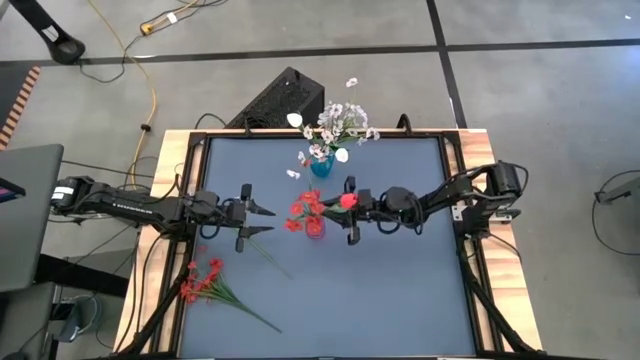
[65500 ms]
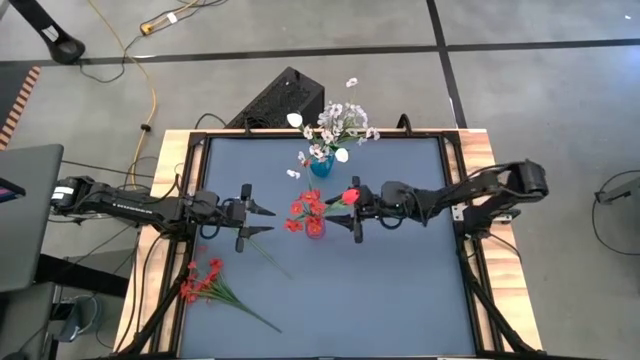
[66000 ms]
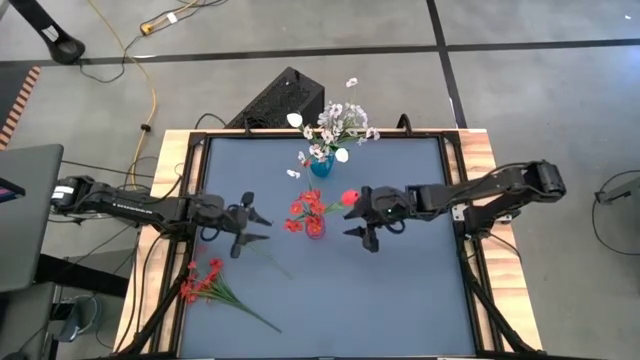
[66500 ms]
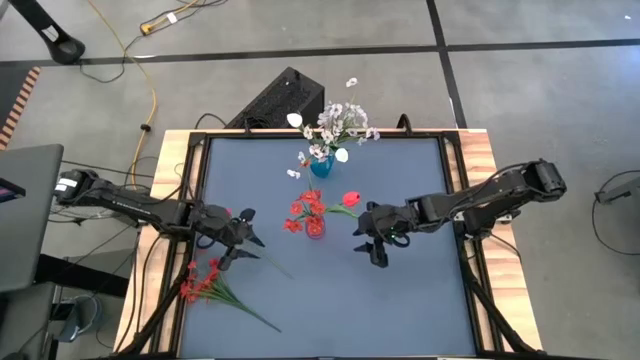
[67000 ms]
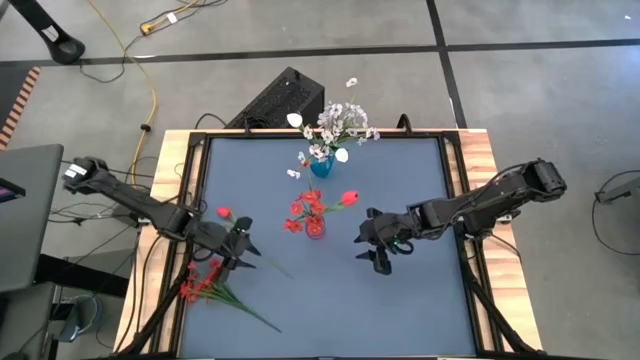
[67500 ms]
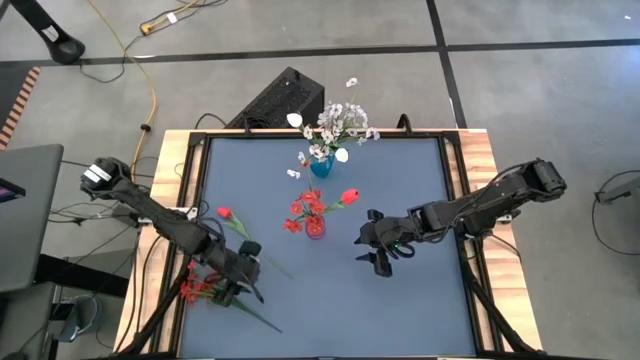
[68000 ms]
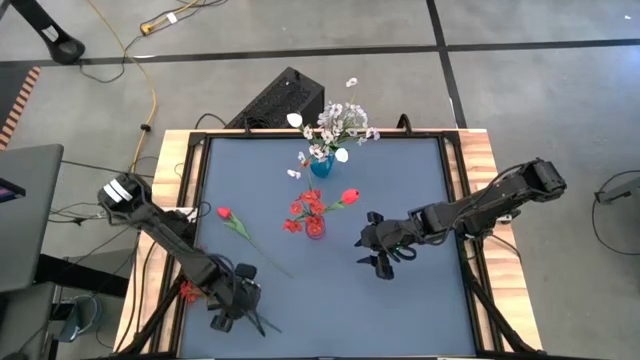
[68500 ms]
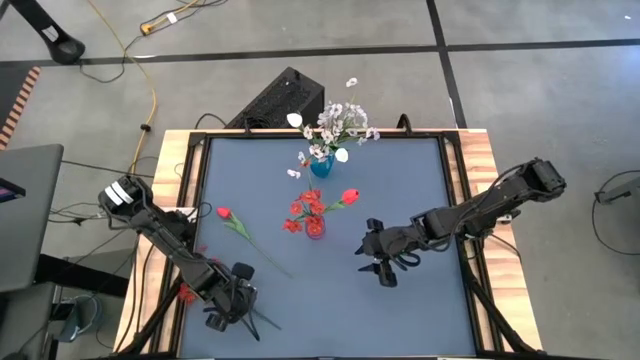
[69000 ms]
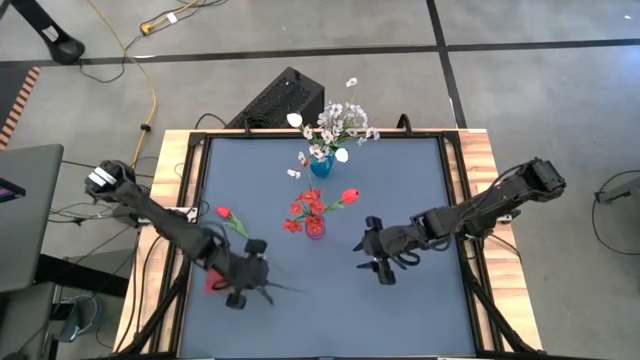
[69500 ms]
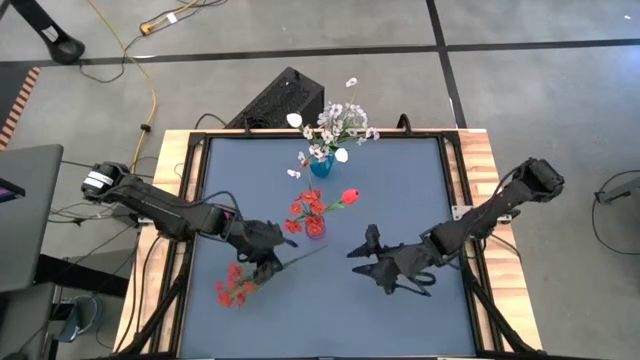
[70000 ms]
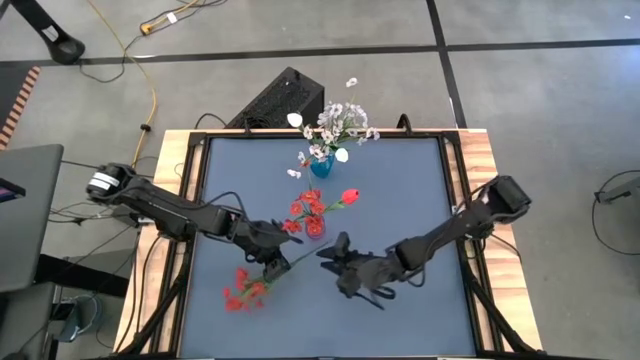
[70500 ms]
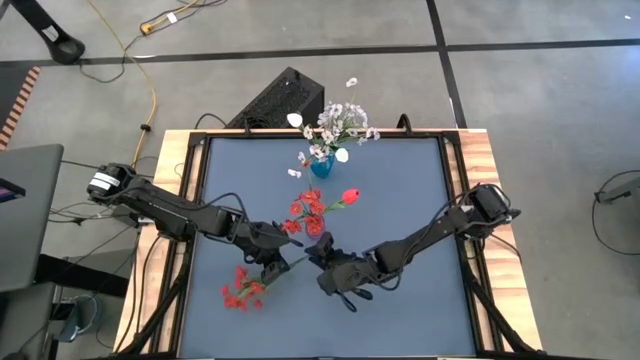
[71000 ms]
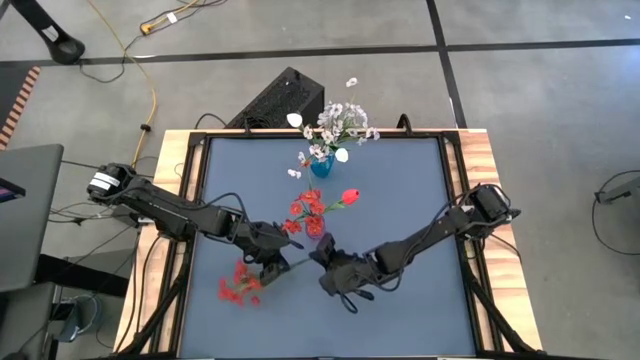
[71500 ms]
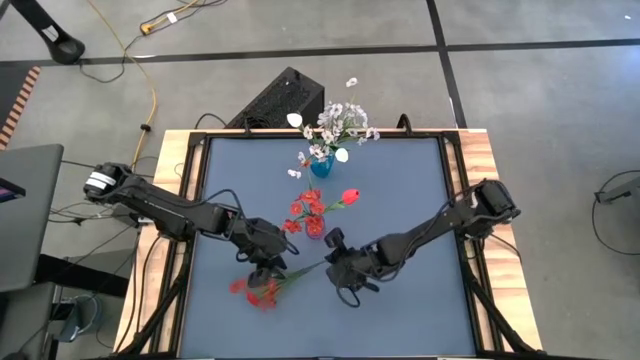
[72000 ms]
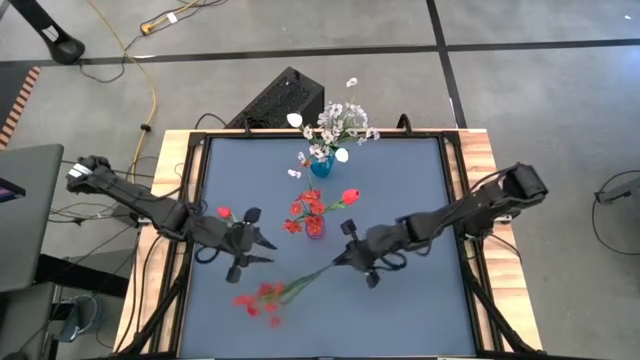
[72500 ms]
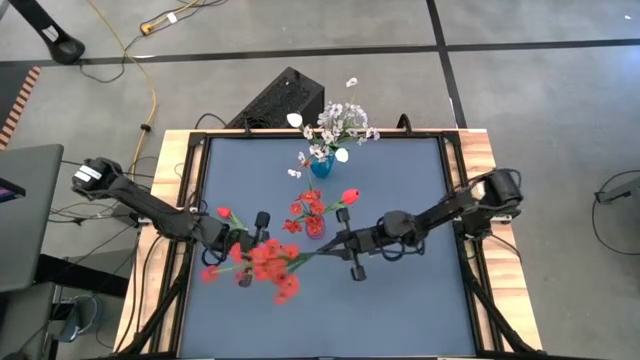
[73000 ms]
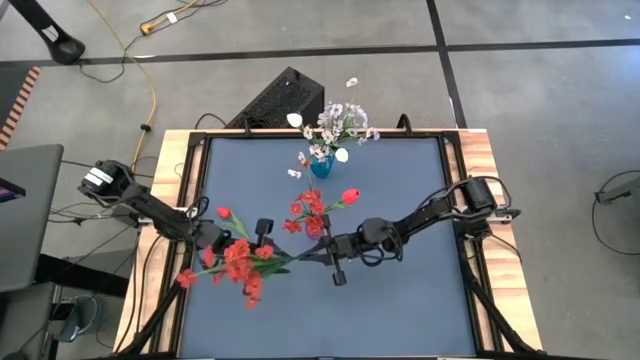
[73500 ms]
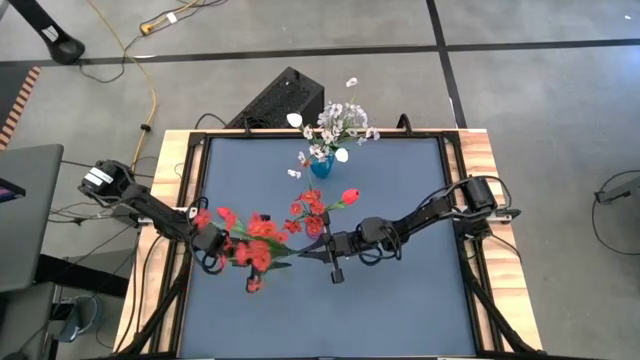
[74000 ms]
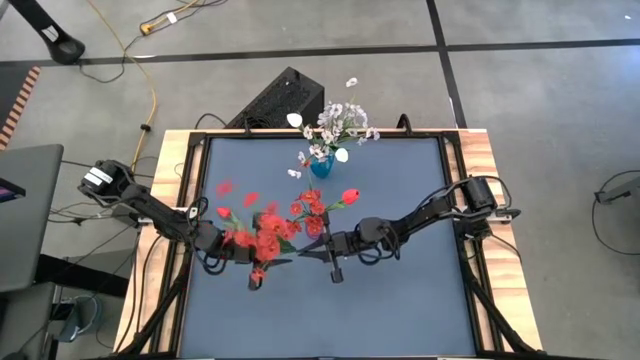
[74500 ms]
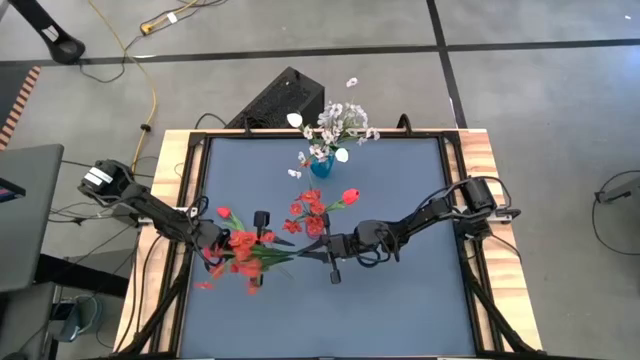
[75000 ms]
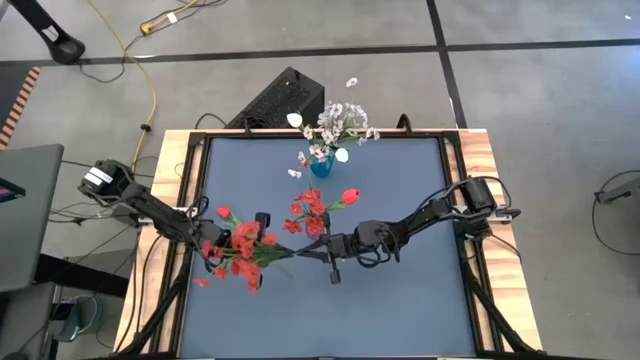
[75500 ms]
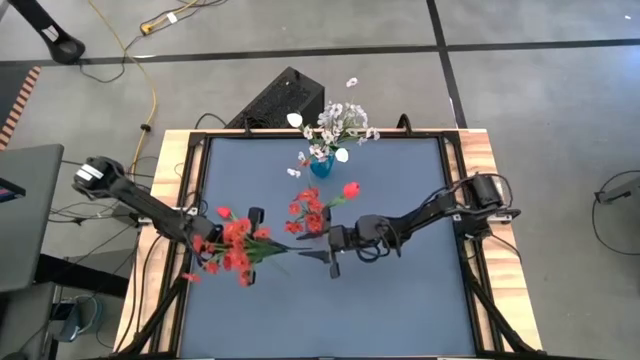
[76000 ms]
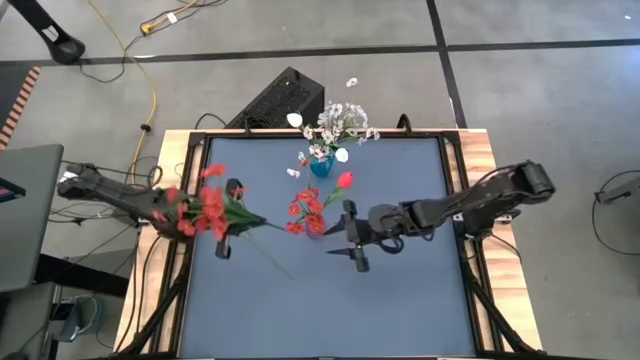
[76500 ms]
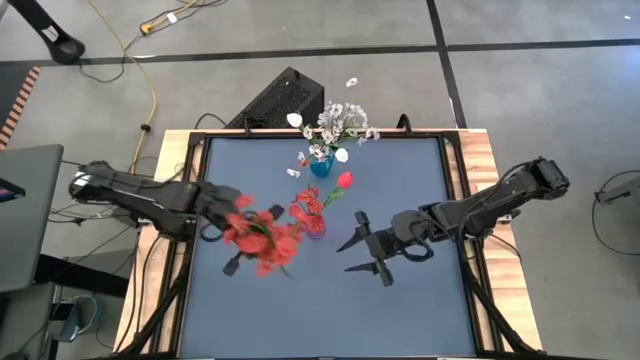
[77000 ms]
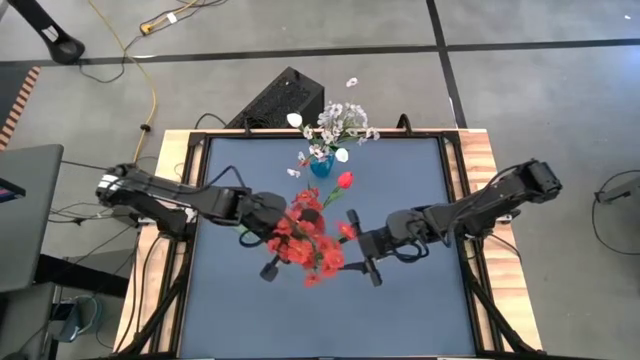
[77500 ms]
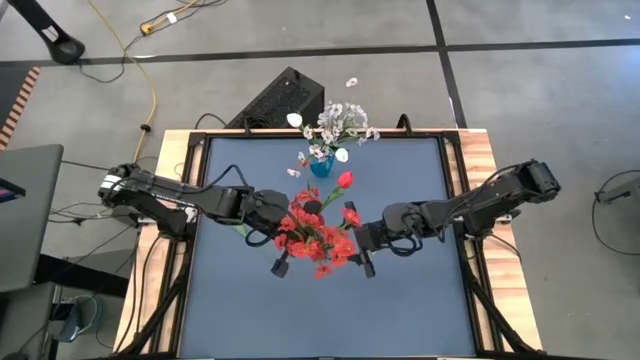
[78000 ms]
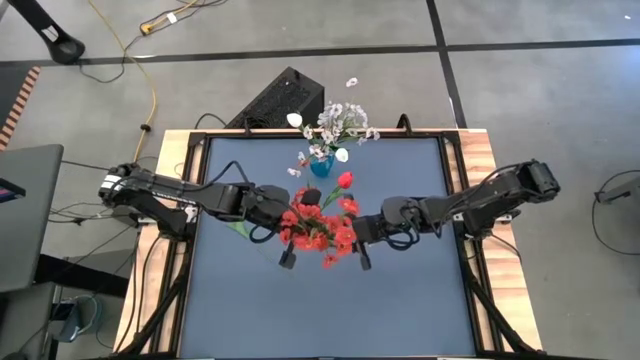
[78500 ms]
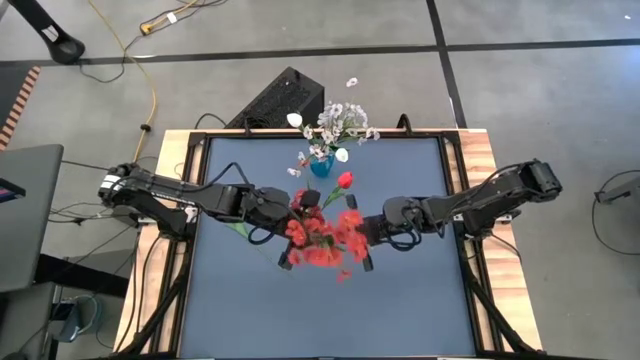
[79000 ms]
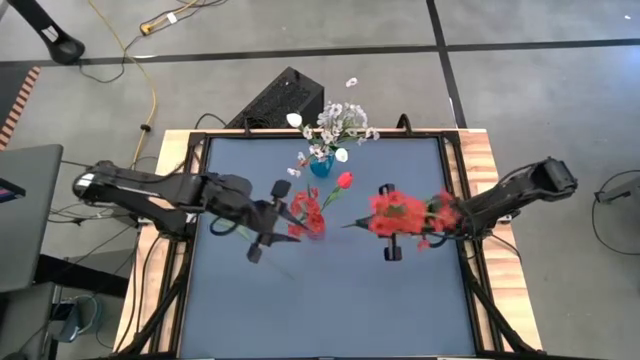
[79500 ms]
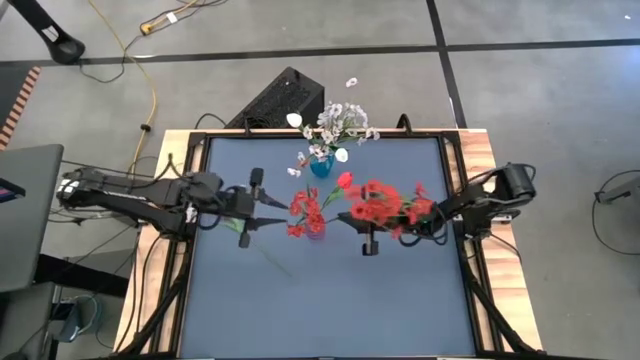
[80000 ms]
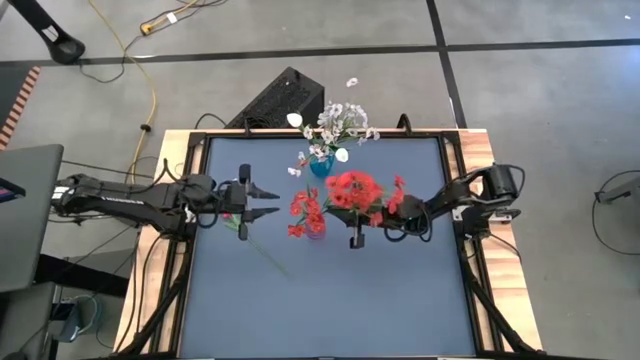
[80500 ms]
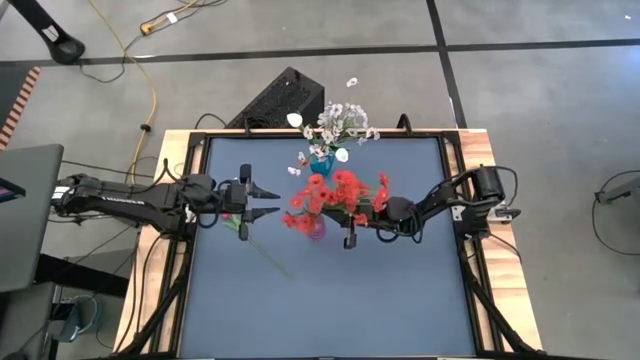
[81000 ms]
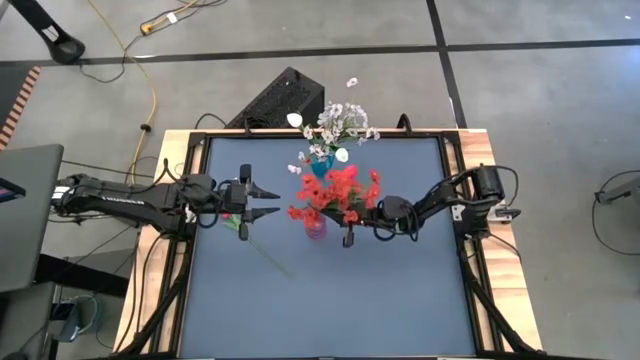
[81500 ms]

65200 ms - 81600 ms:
Task: Sort flowers into vase by color
Put the red flowers into the purple vase

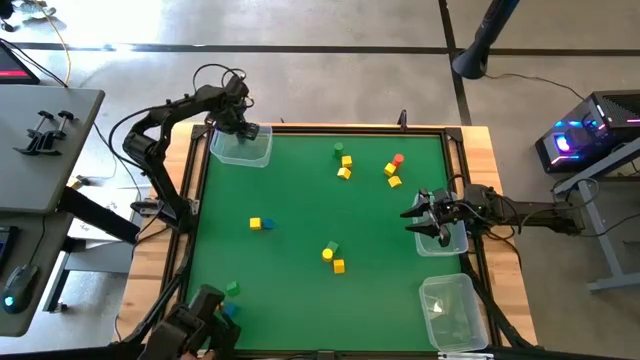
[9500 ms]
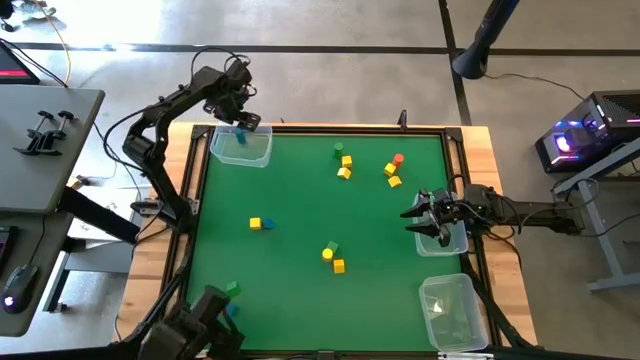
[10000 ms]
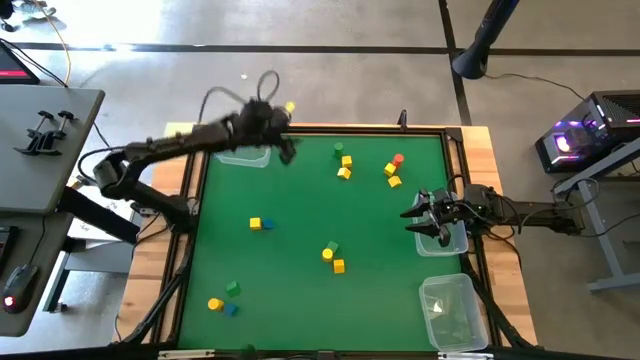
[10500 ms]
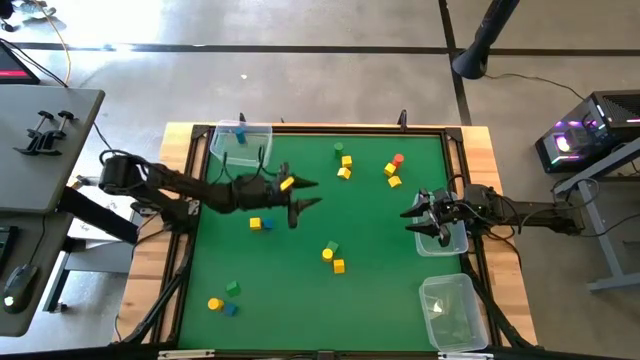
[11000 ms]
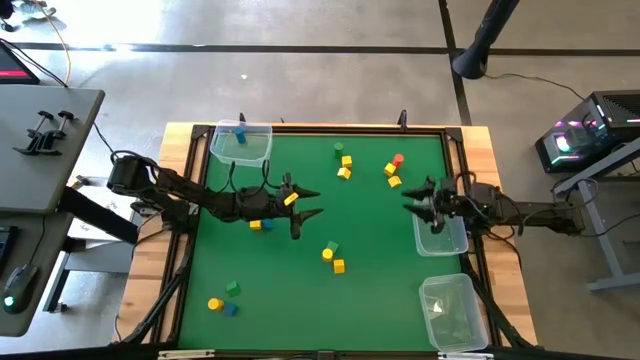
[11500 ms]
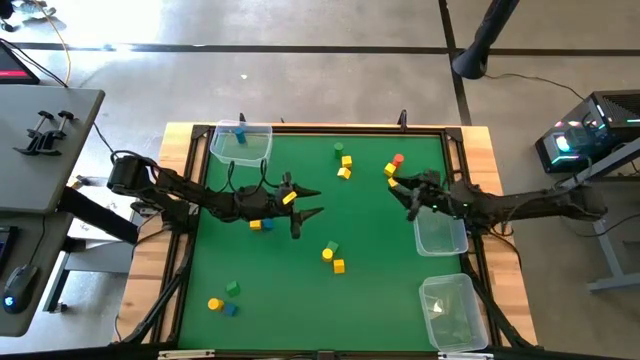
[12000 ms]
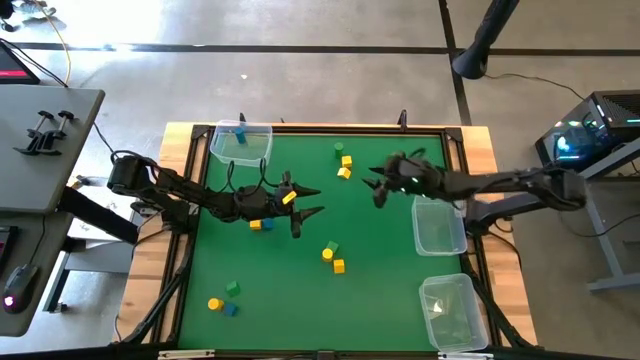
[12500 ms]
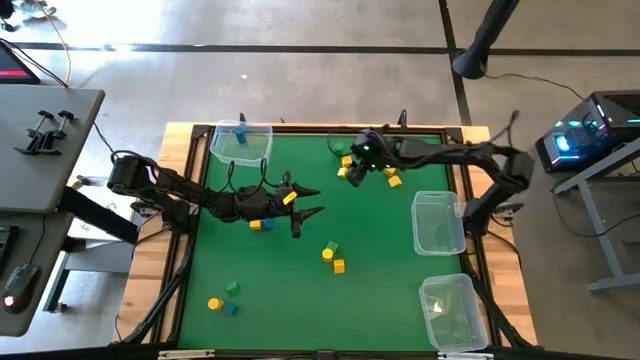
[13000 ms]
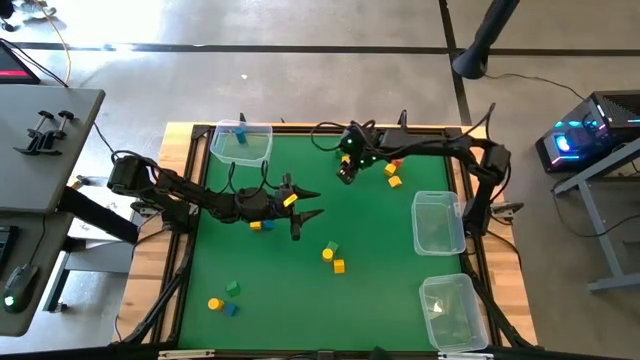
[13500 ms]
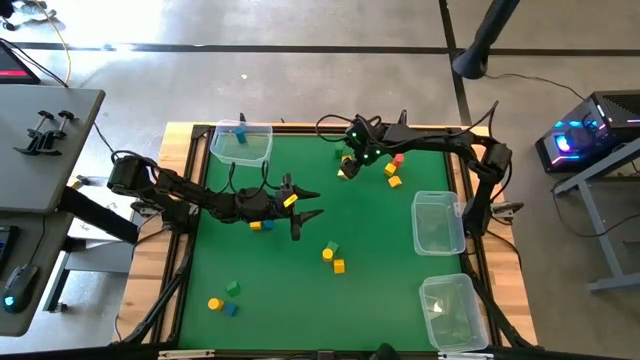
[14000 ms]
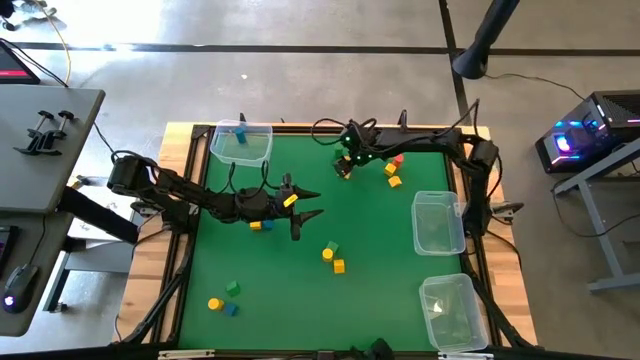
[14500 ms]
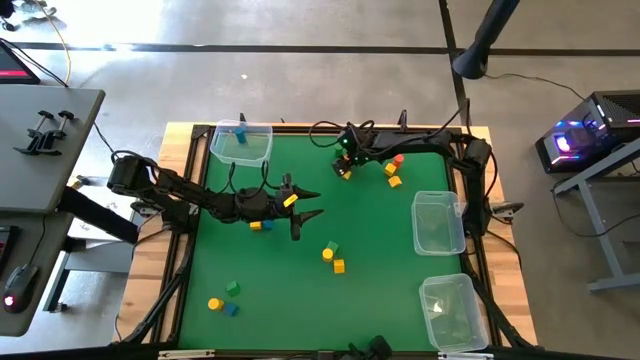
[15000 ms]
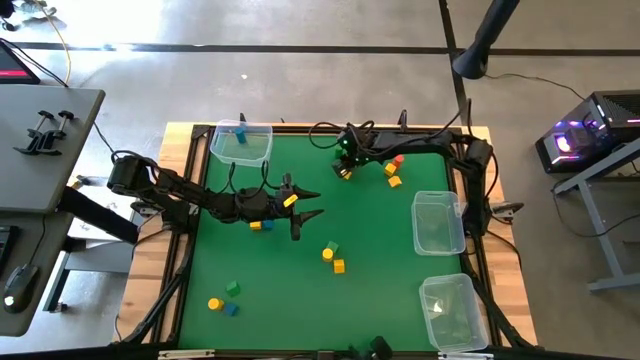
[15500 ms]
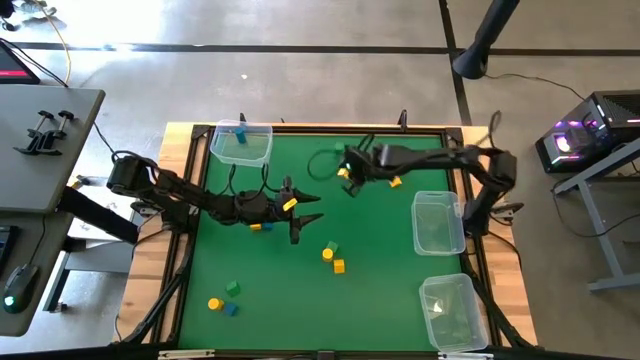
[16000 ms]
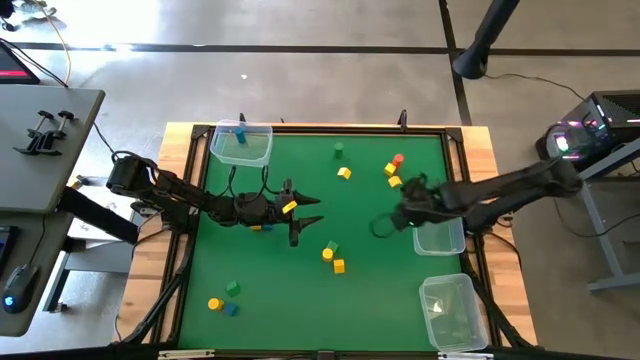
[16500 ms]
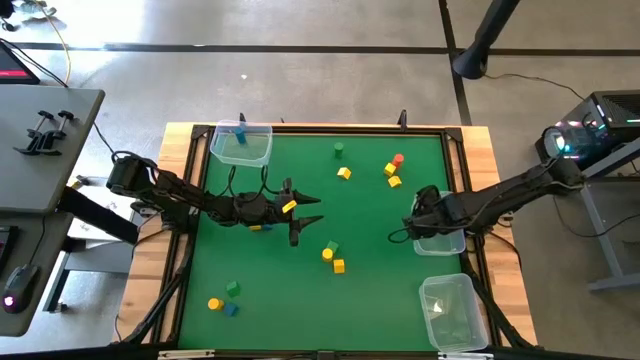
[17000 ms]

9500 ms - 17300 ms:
Task: Sort blocks by size
Put the top yellow cube block into the middle transparent bin
